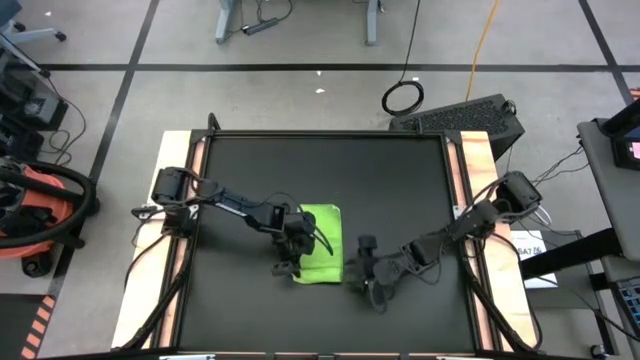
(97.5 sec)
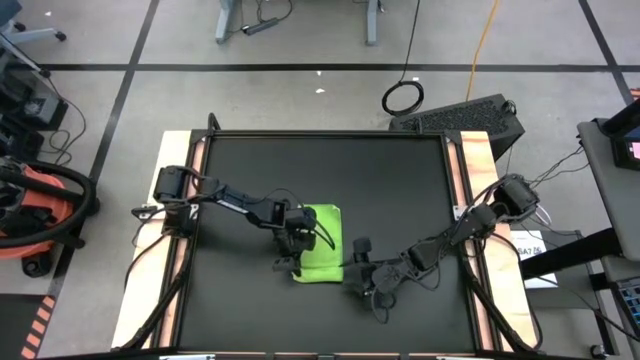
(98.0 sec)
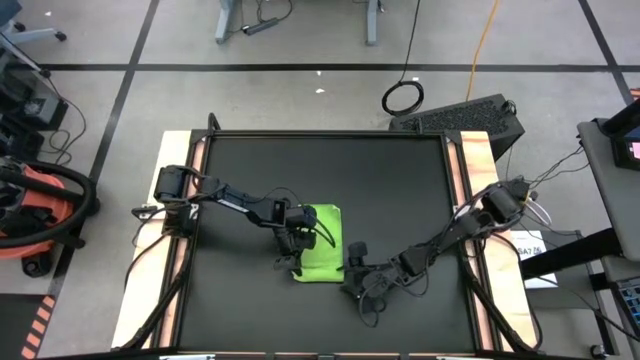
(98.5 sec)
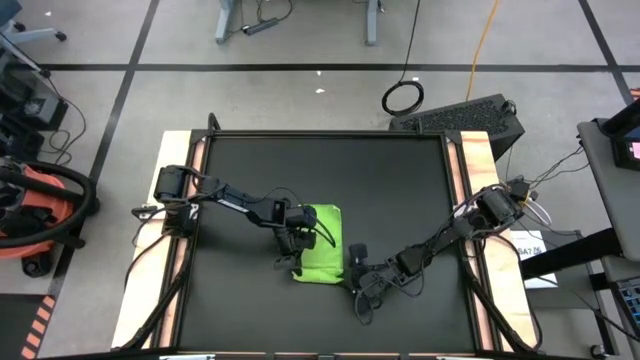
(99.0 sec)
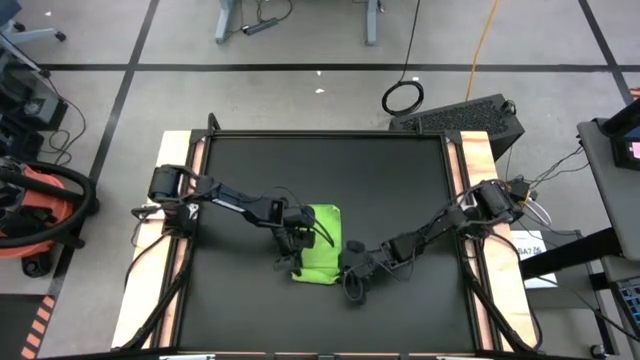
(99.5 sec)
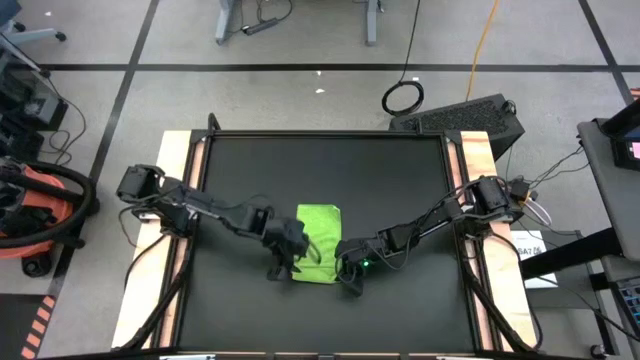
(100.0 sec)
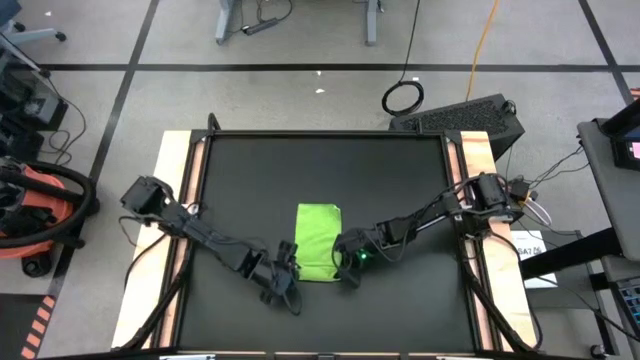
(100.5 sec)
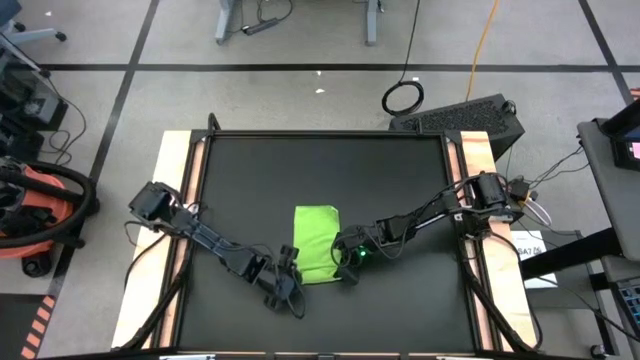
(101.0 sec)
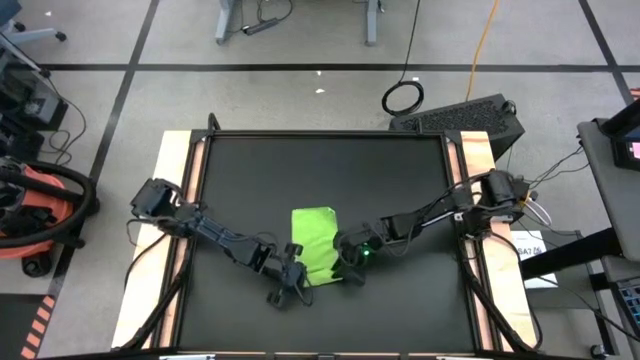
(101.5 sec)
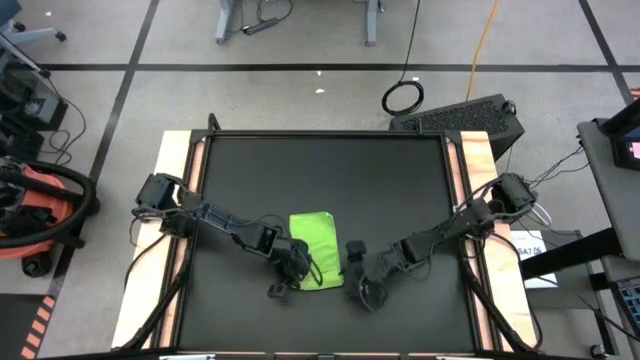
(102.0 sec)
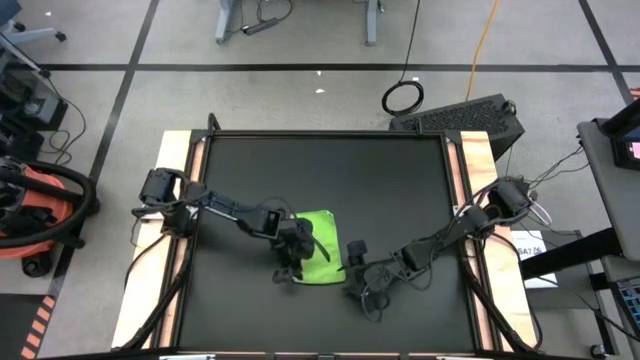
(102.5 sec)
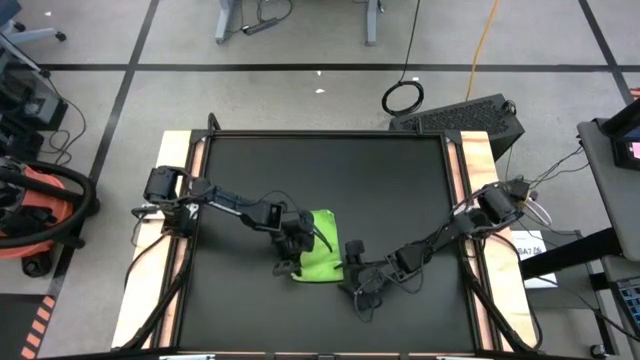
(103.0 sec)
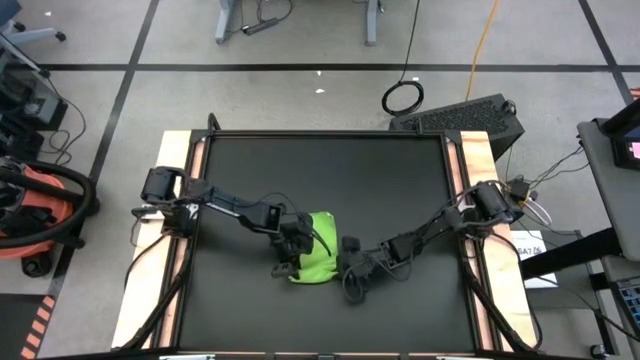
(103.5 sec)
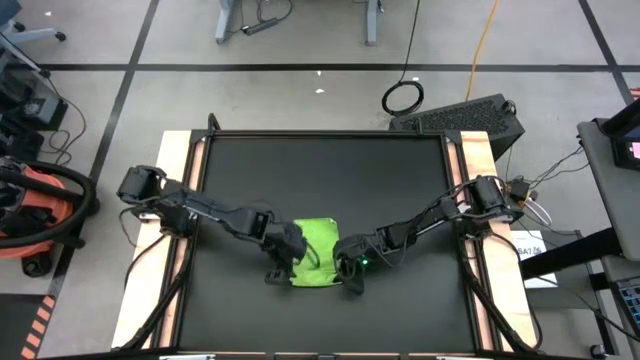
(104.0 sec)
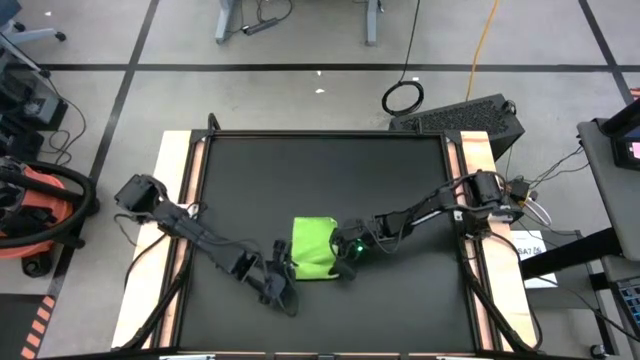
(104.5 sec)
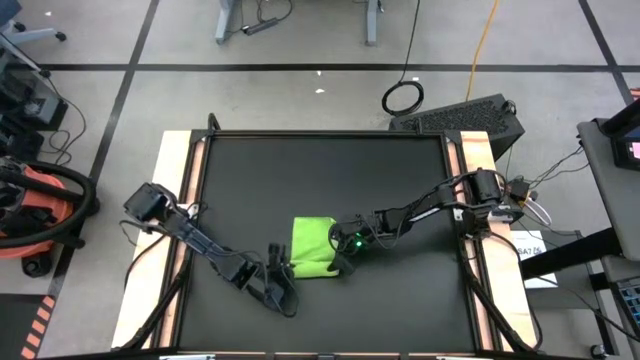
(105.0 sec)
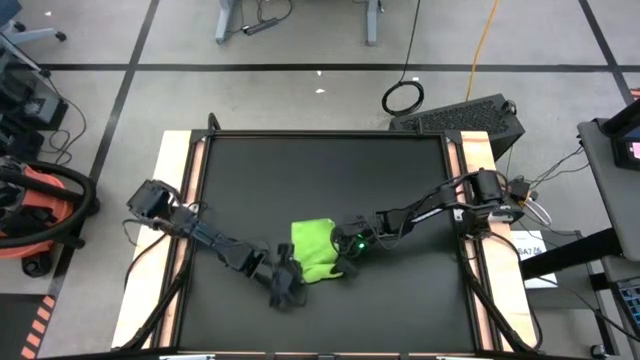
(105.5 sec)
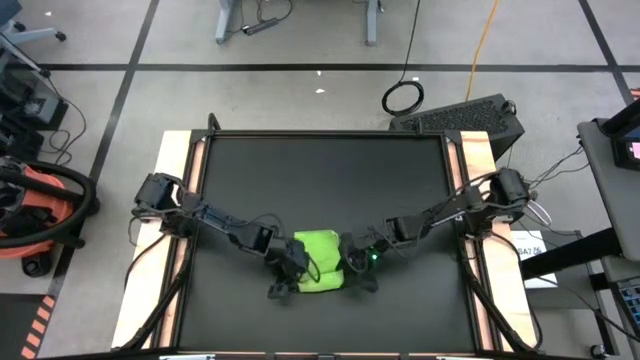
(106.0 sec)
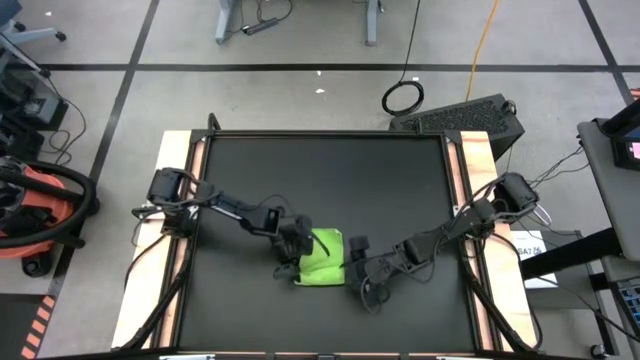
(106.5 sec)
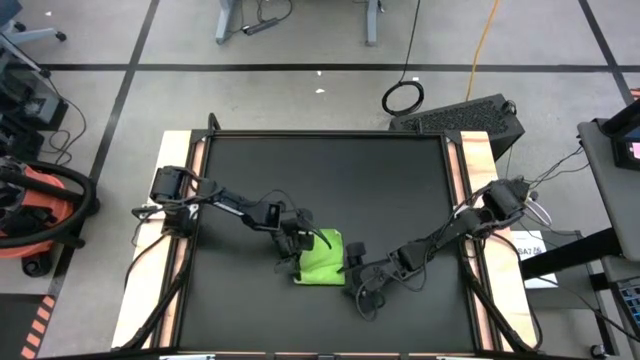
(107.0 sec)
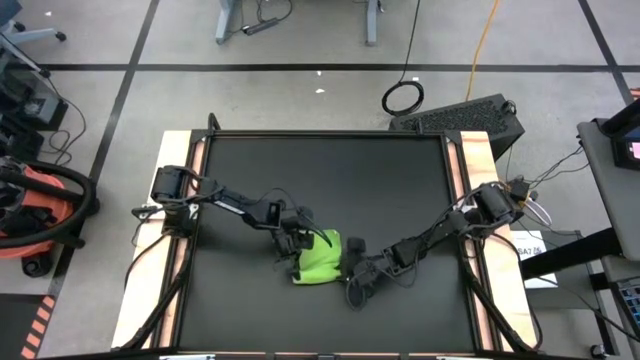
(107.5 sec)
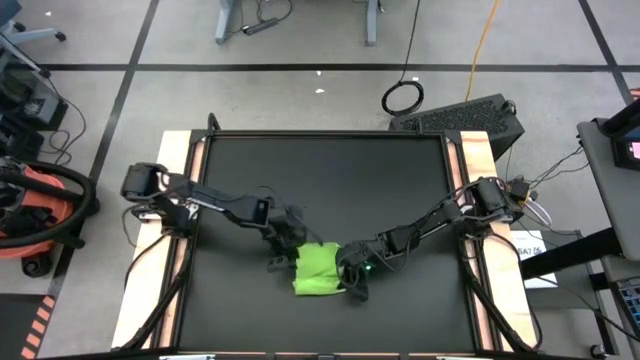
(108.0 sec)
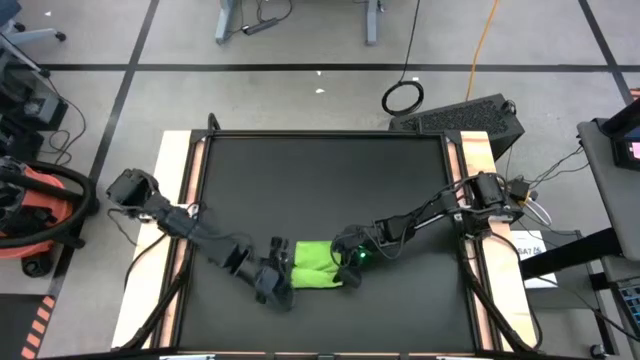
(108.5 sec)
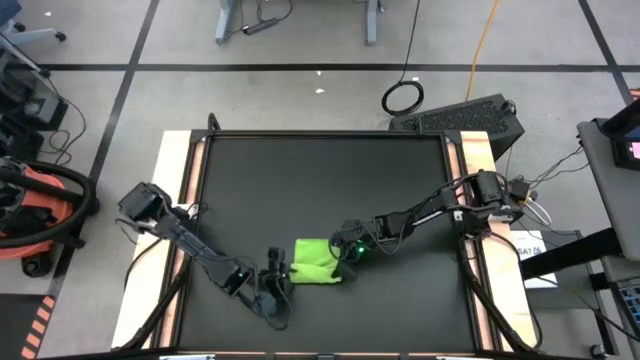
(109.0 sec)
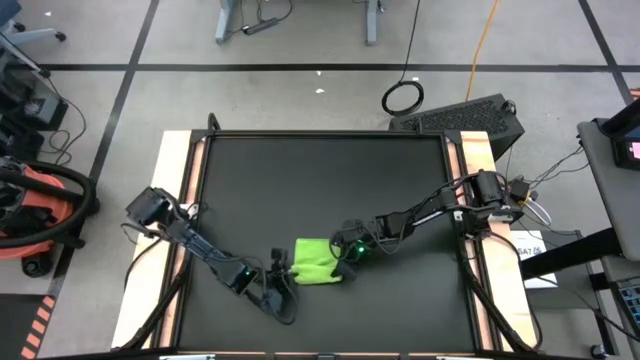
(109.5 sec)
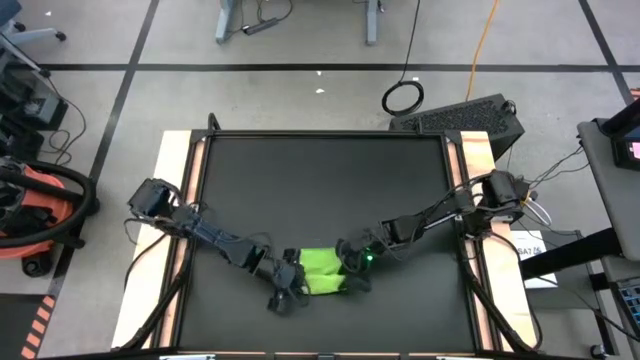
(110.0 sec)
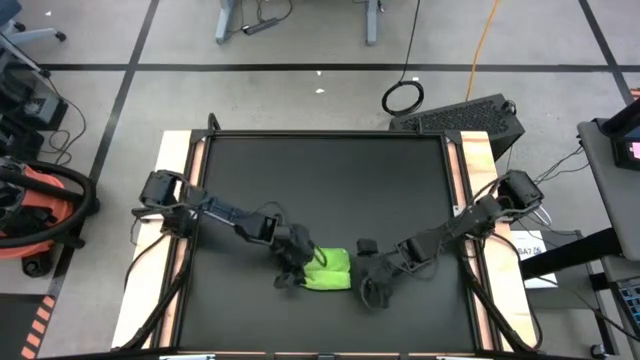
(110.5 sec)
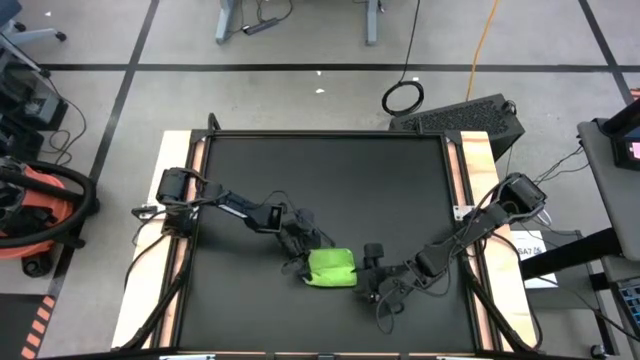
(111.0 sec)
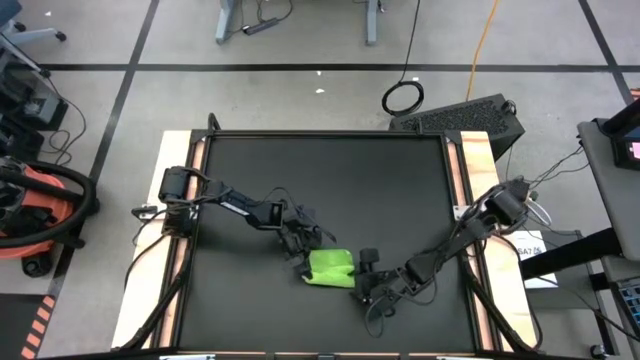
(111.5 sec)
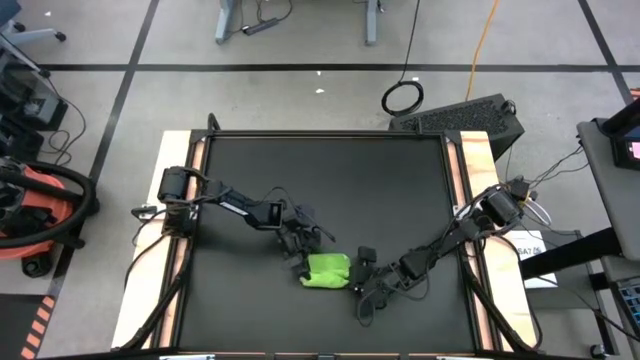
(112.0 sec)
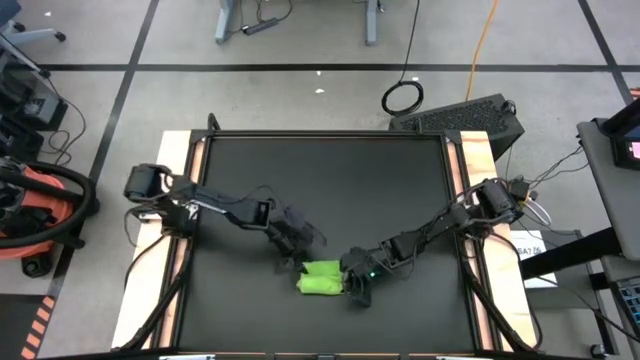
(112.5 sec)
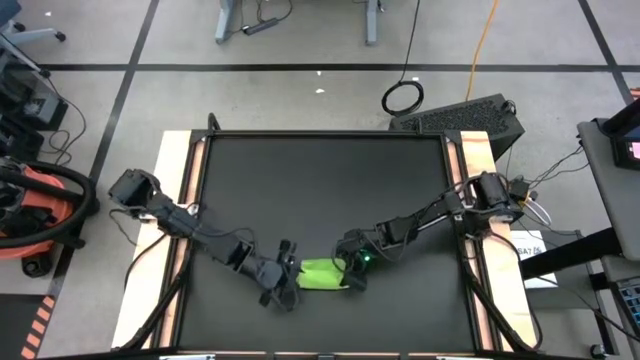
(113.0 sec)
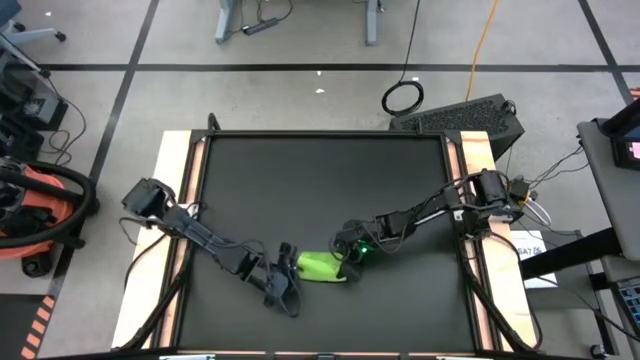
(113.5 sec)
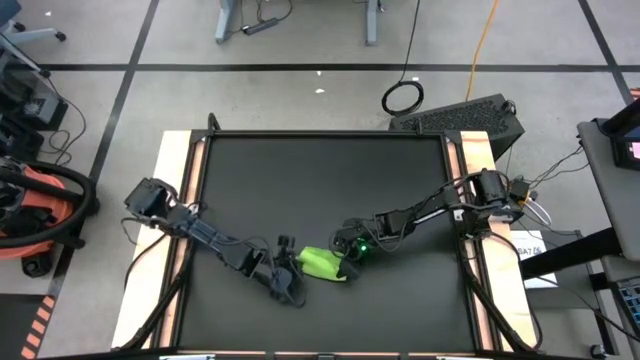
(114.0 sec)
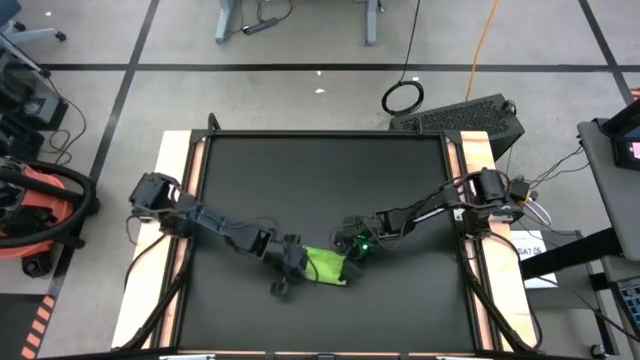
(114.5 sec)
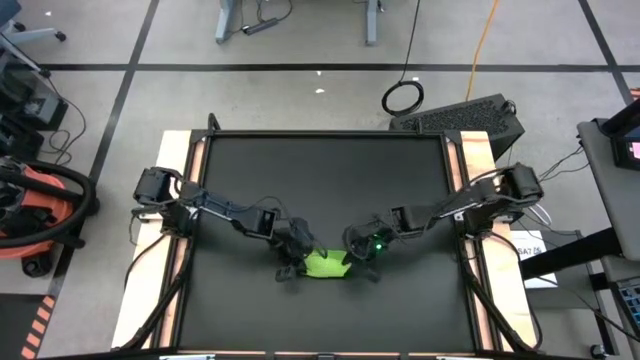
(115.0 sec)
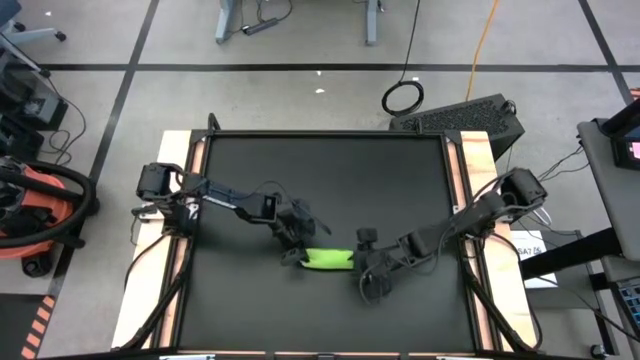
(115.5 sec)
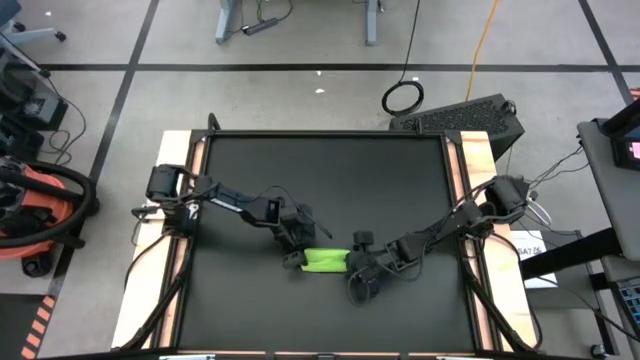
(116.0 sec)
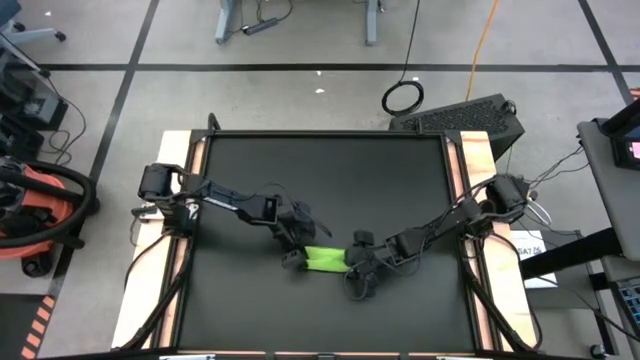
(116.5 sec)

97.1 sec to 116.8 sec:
Task: Roll towel
Roll the green microfiber towel

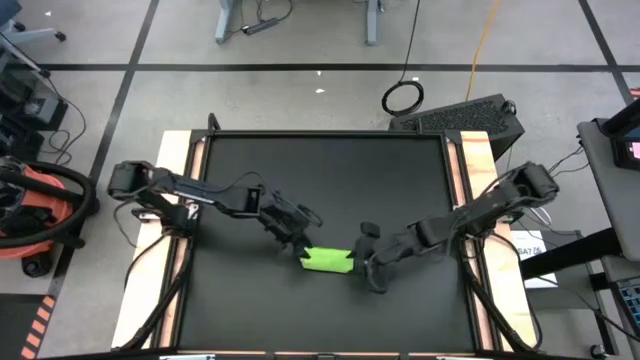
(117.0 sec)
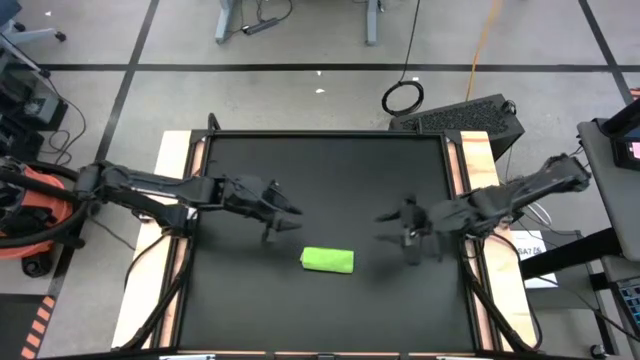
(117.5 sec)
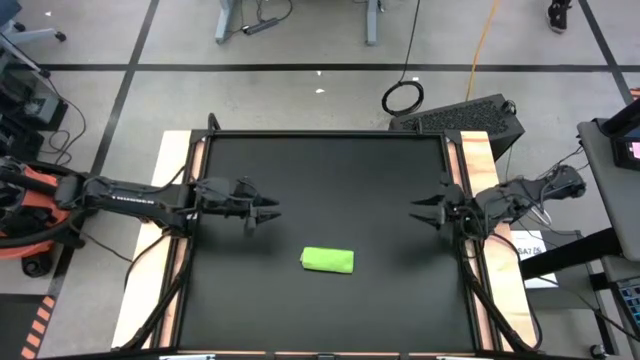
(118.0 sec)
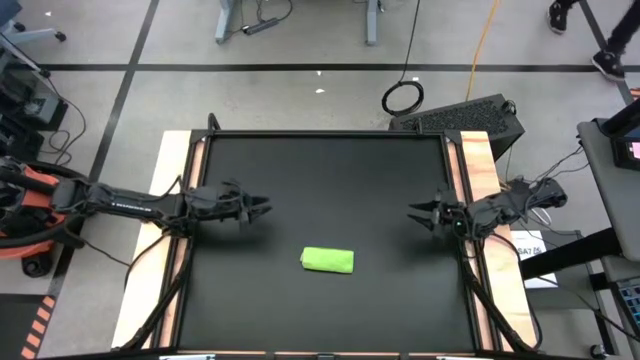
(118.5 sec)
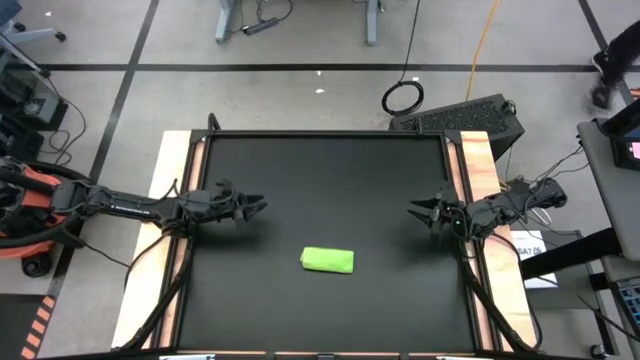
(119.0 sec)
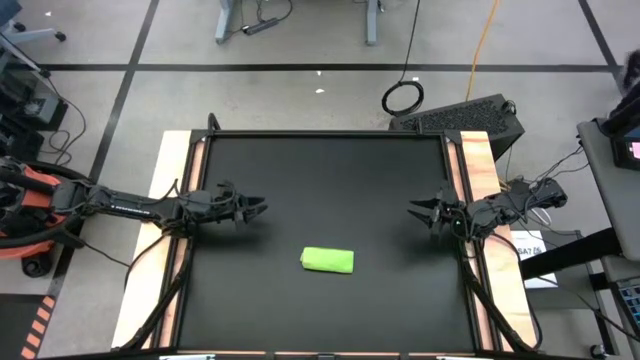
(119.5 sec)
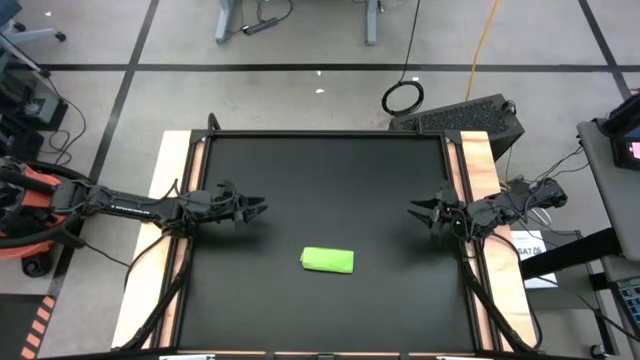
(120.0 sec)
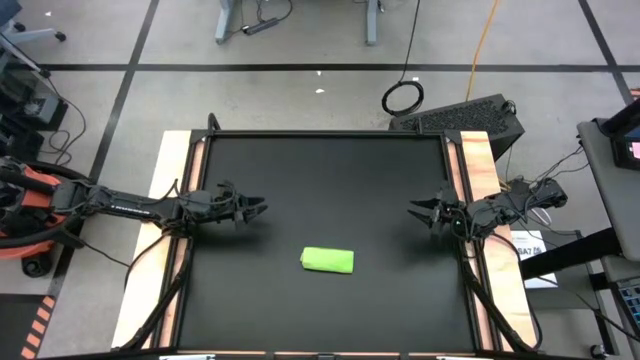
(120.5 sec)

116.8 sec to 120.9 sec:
Return To Home Position
